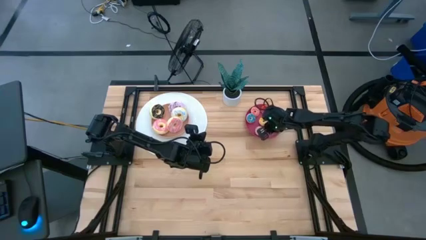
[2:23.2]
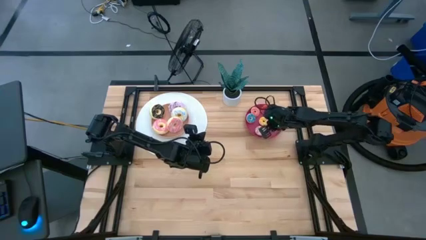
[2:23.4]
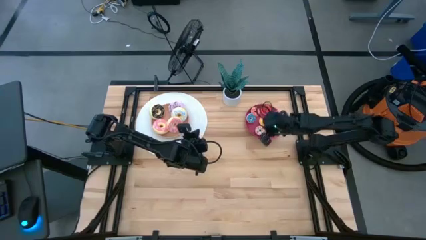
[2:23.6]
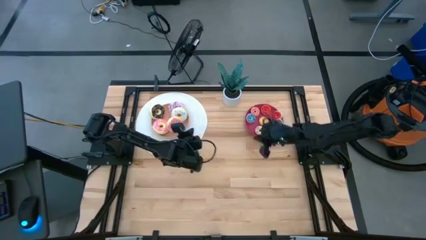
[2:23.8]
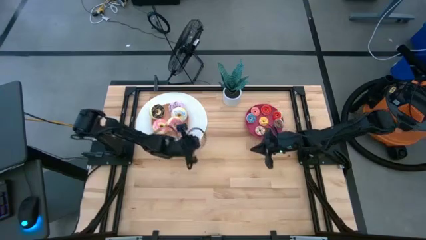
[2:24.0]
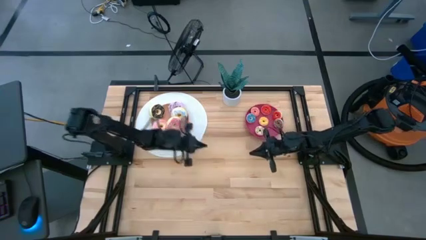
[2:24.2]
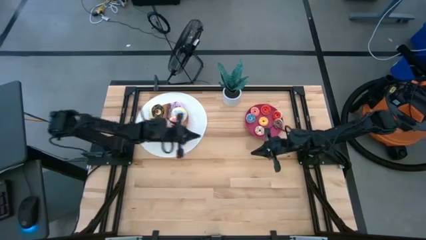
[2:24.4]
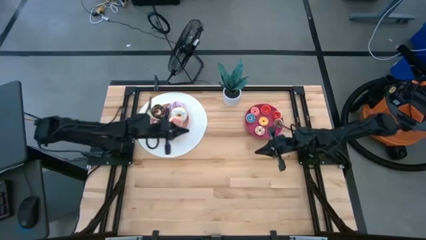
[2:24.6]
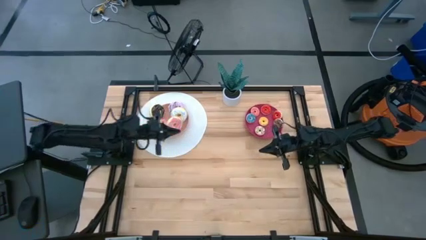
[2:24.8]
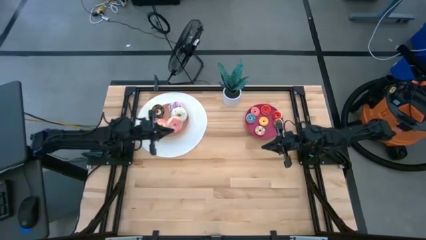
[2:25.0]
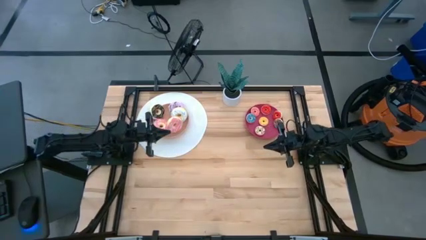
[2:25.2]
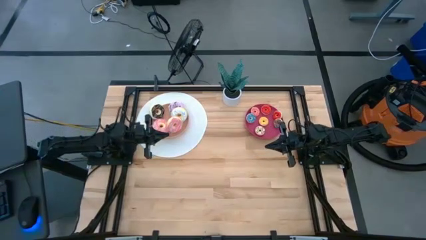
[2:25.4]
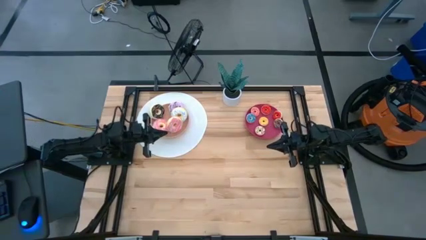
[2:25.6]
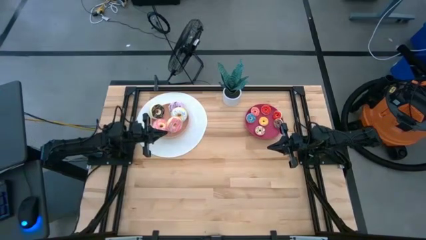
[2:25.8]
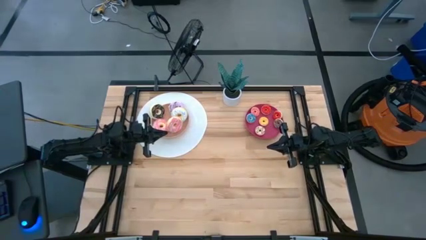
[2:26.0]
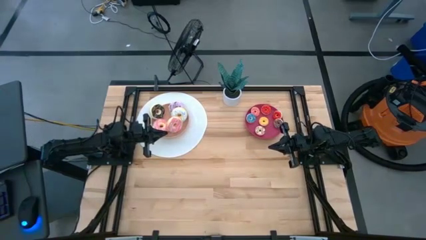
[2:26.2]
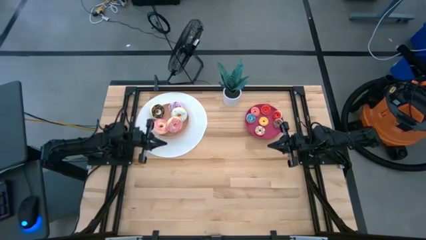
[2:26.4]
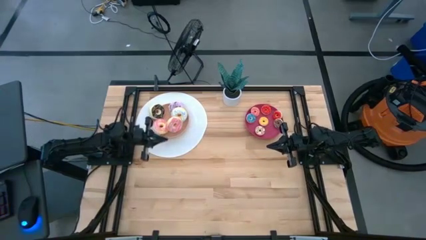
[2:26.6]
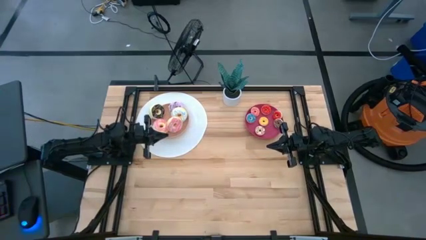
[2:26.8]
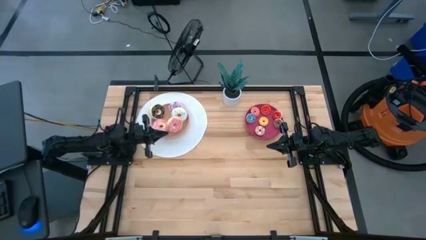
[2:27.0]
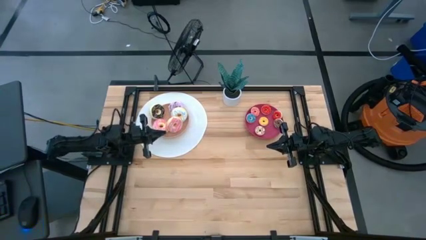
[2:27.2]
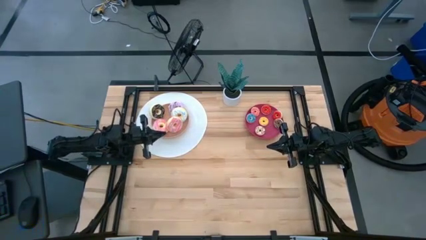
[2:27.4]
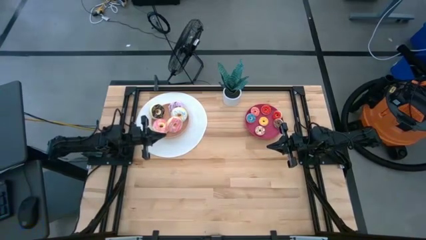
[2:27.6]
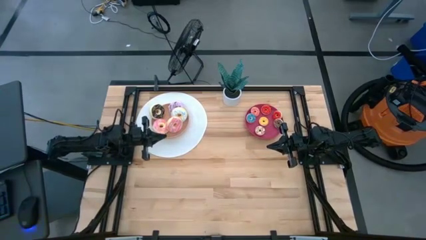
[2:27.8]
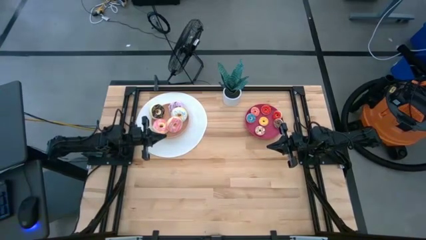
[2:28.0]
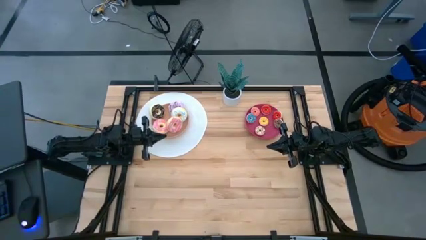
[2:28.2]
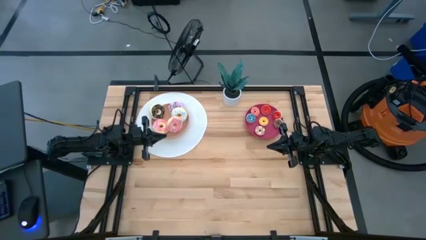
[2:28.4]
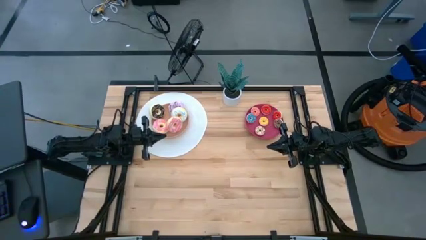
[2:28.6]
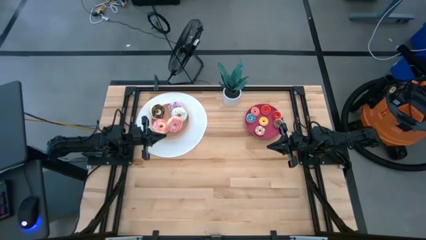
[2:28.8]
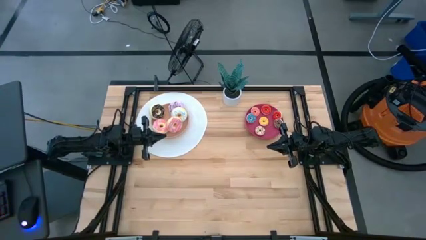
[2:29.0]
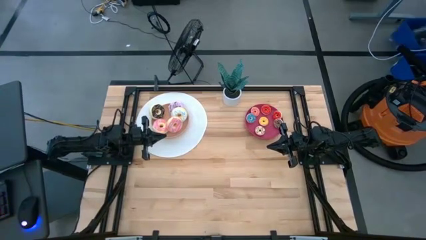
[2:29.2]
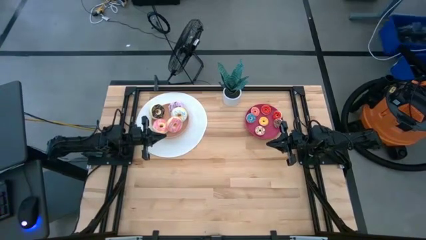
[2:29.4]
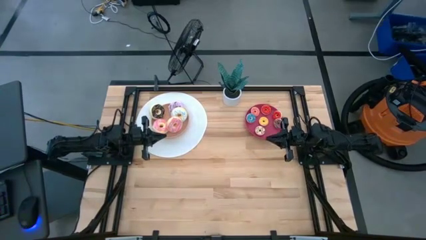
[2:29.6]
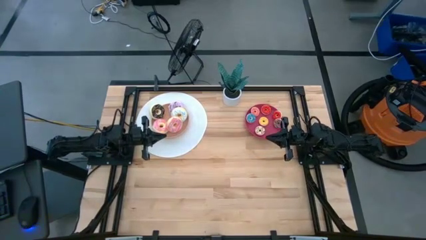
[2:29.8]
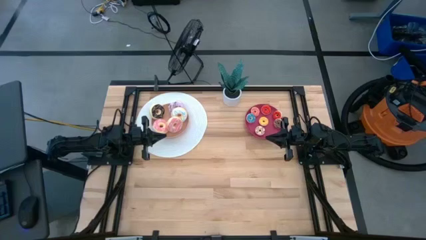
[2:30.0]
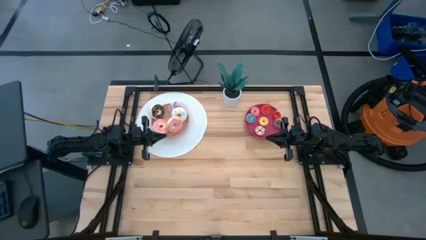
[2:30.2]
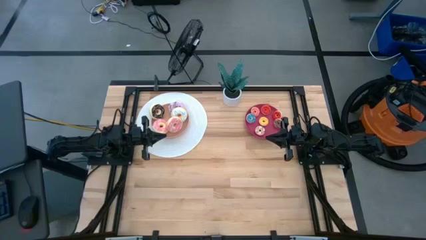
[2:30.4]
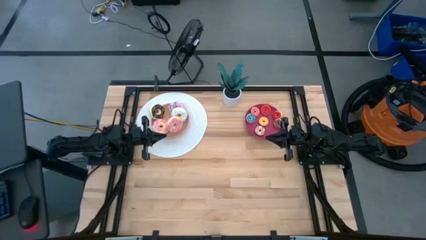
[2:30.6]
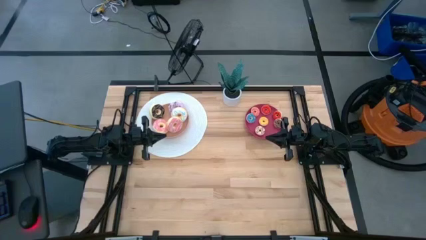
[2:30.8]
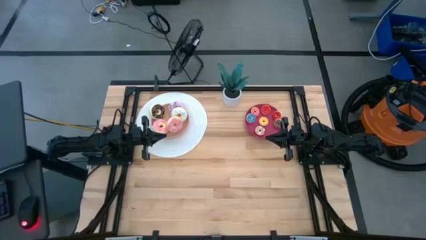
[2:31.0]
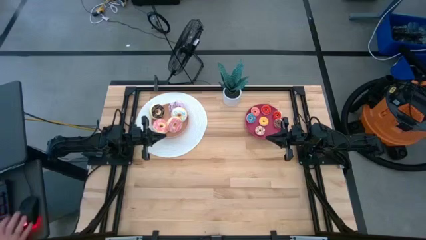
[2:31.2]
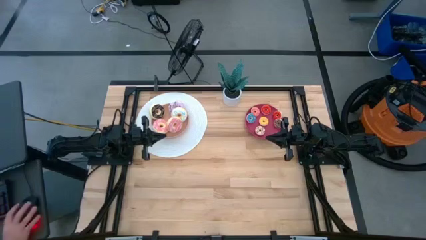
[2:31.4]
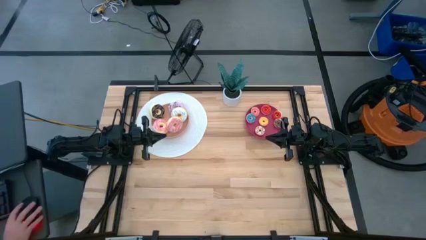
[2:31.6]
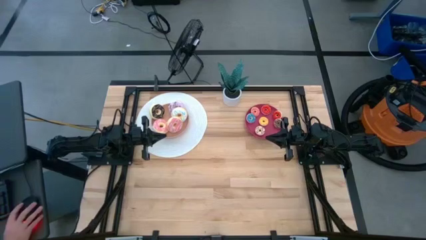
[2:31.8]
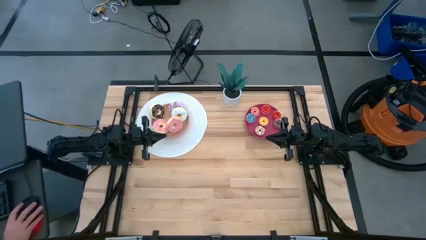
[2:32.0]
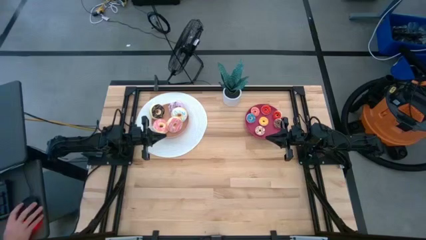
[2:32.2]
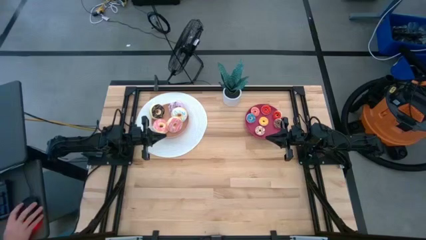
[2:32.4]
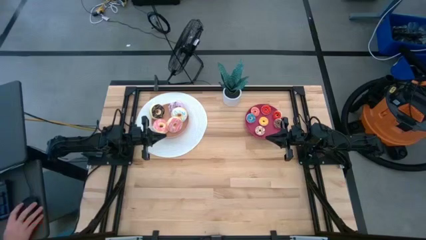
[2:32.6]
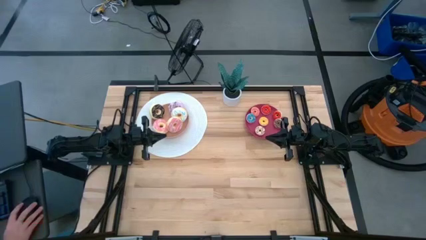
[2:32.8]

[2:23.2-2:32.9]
Task: Pick & Place donuts
Return to Home Position
